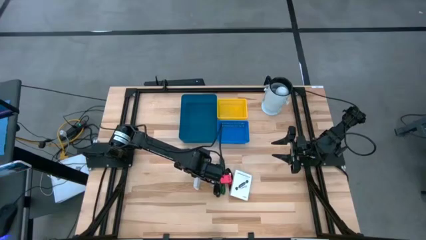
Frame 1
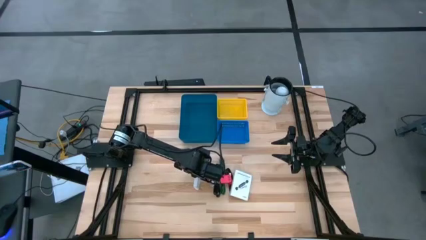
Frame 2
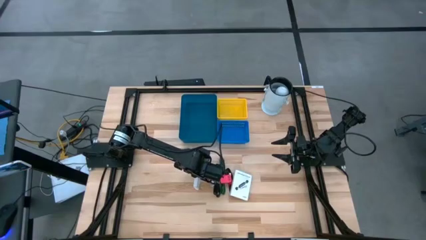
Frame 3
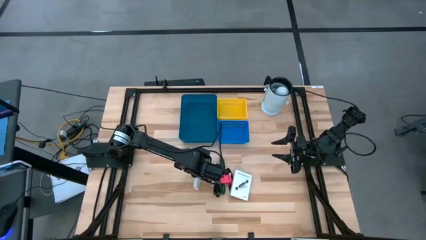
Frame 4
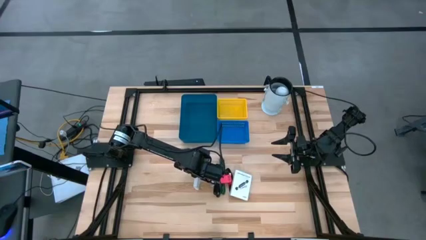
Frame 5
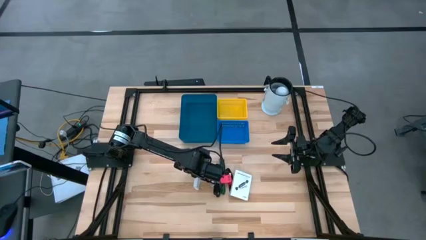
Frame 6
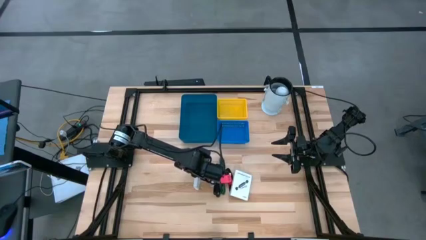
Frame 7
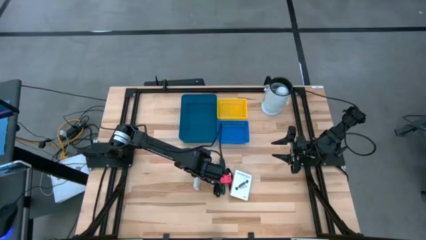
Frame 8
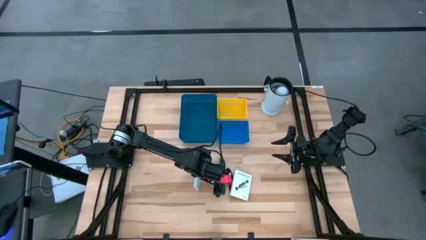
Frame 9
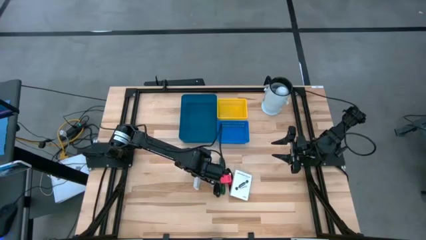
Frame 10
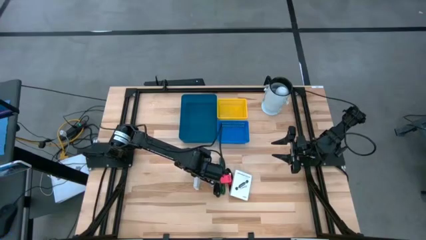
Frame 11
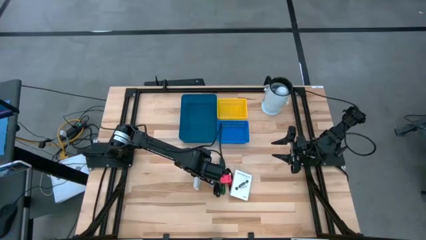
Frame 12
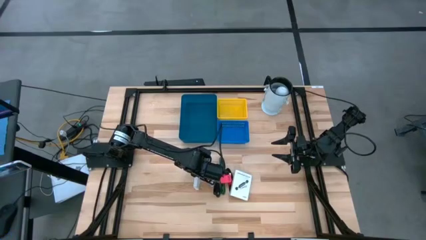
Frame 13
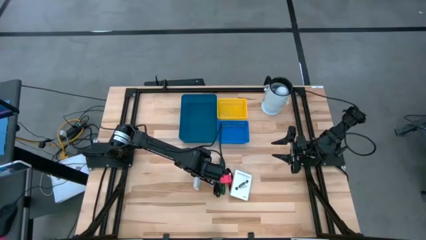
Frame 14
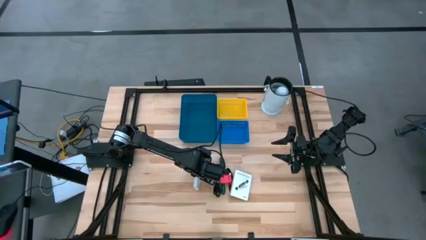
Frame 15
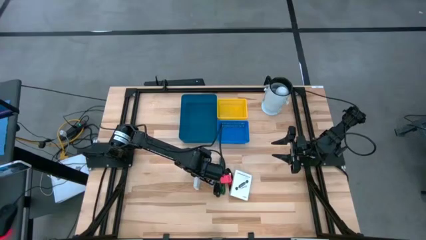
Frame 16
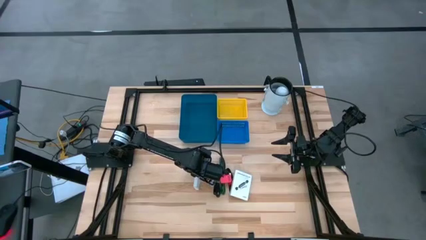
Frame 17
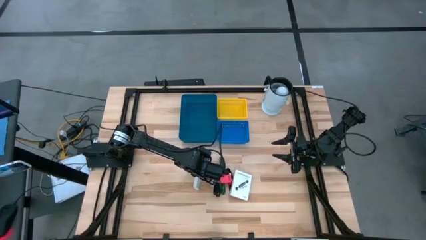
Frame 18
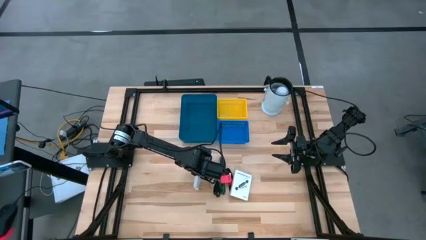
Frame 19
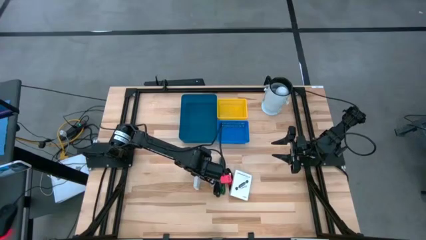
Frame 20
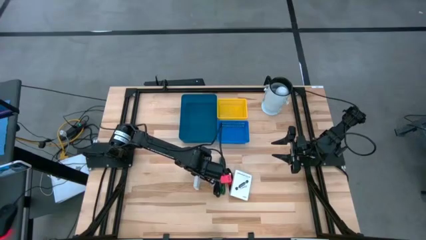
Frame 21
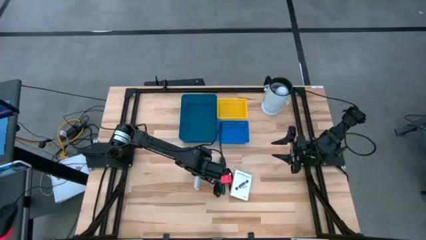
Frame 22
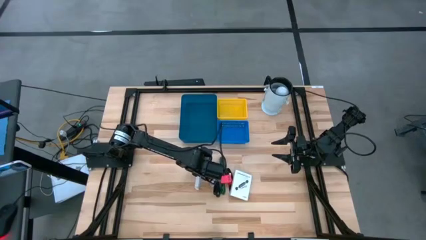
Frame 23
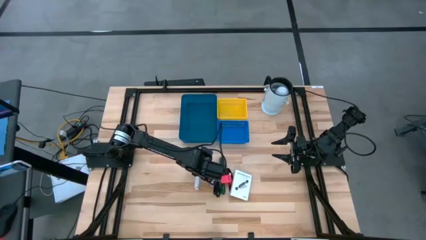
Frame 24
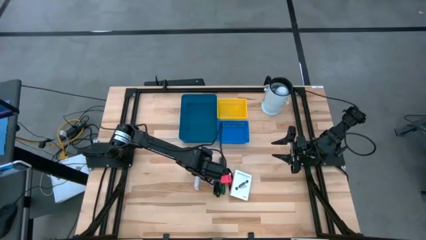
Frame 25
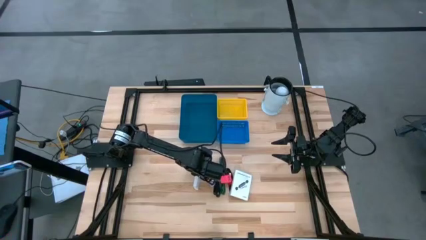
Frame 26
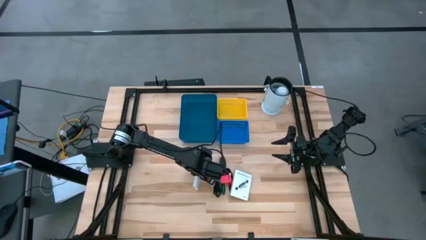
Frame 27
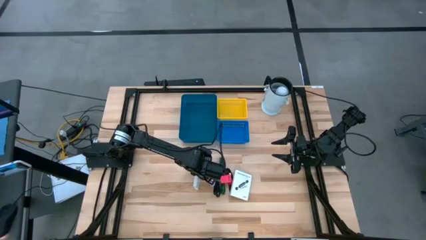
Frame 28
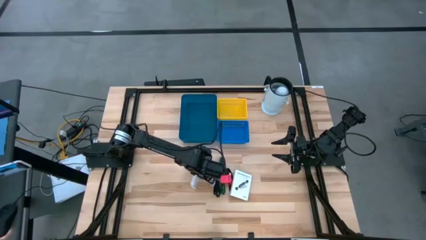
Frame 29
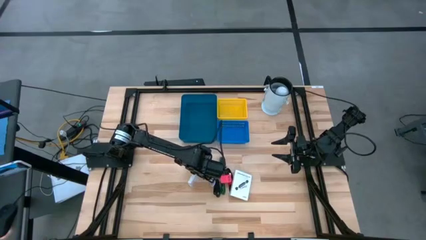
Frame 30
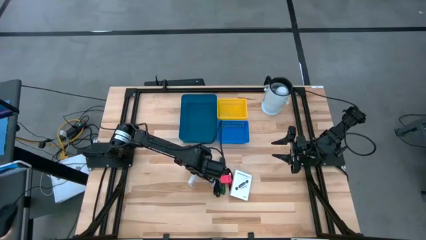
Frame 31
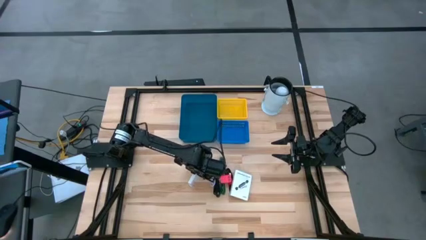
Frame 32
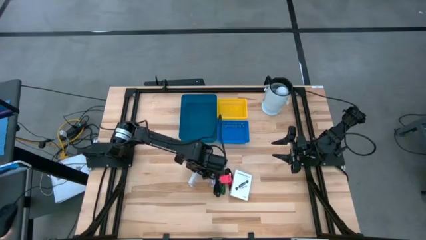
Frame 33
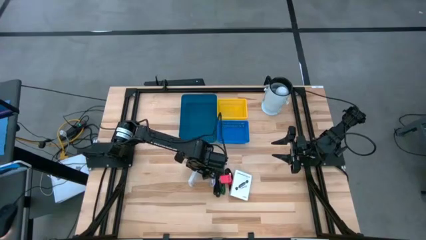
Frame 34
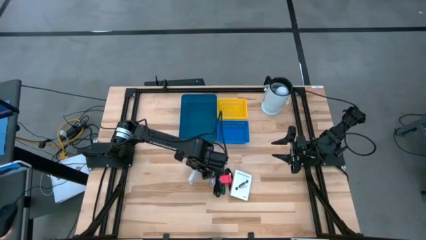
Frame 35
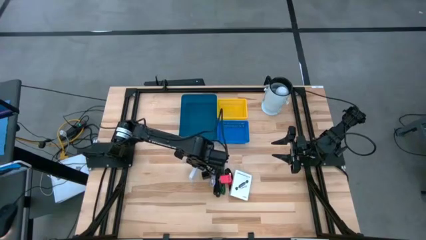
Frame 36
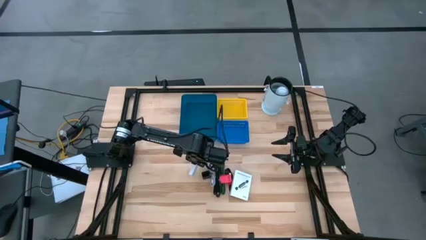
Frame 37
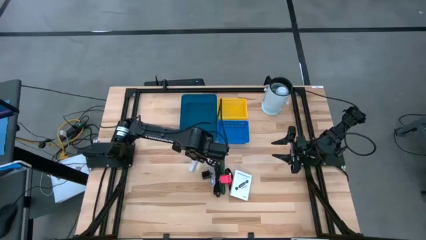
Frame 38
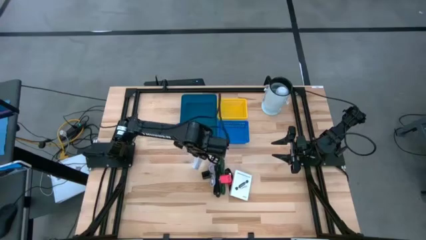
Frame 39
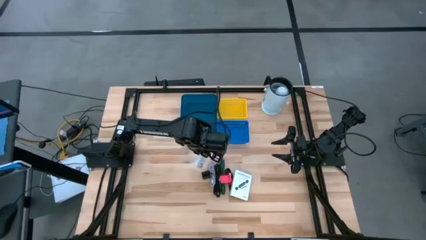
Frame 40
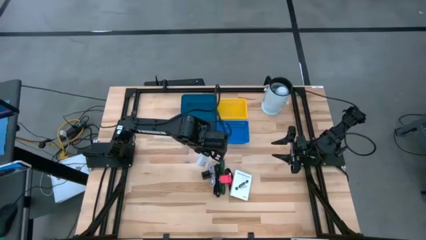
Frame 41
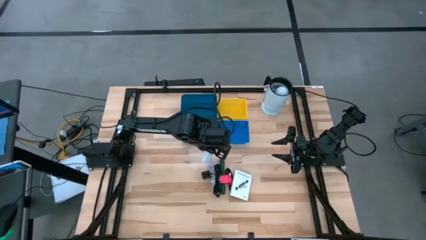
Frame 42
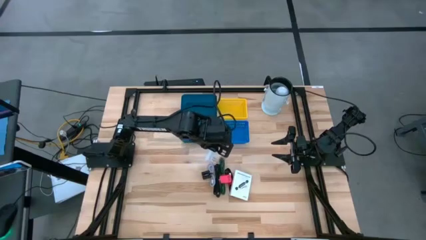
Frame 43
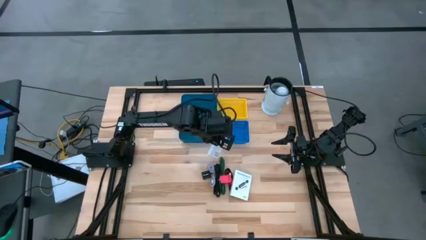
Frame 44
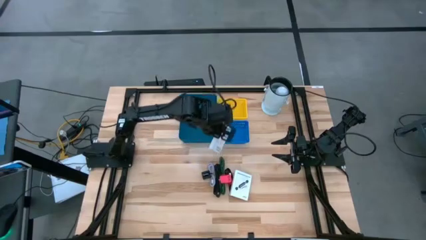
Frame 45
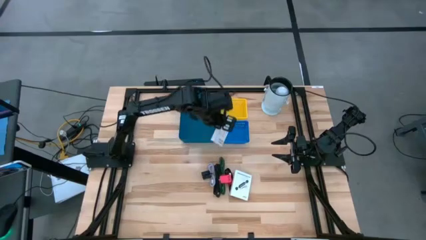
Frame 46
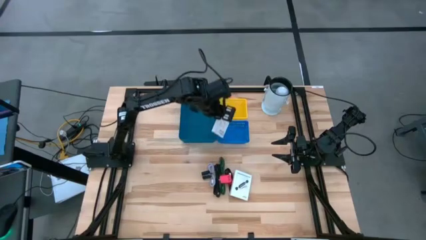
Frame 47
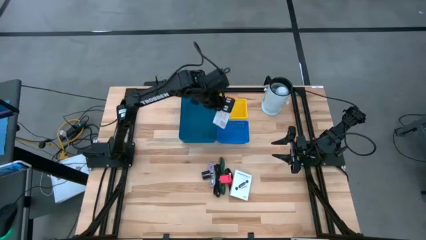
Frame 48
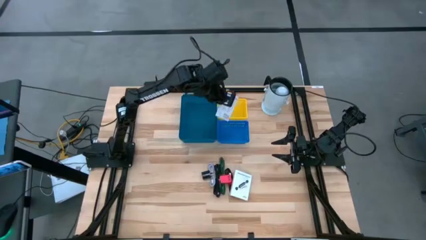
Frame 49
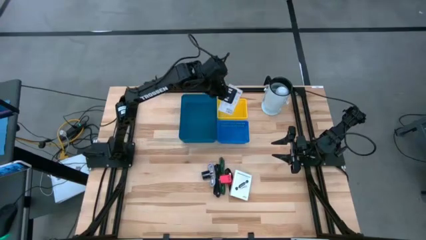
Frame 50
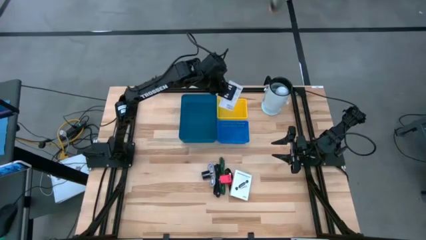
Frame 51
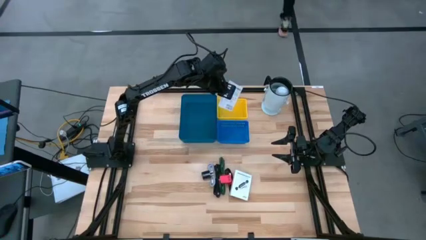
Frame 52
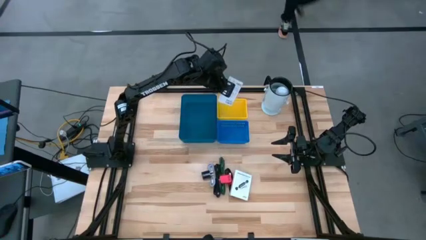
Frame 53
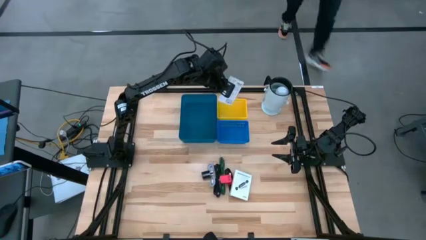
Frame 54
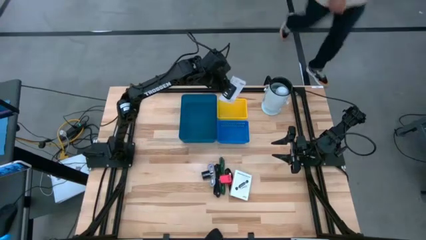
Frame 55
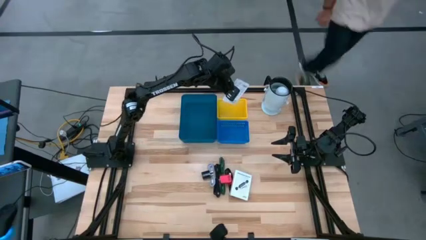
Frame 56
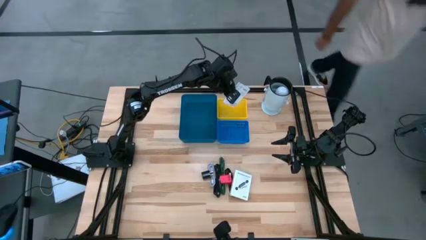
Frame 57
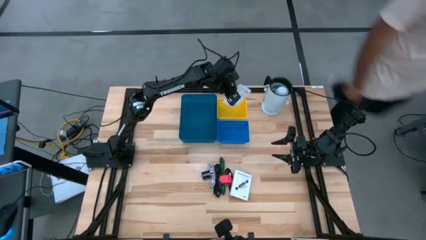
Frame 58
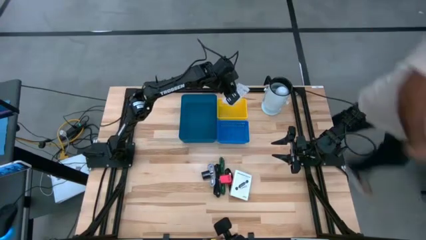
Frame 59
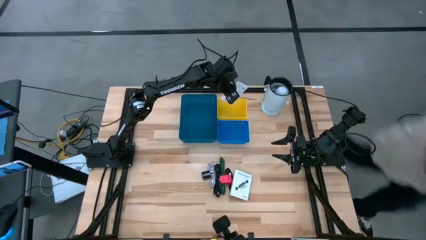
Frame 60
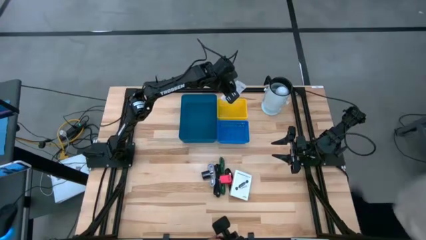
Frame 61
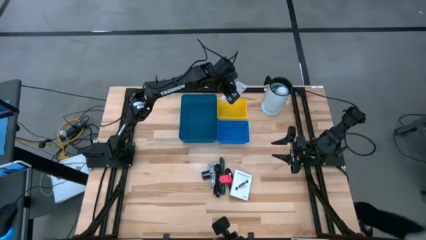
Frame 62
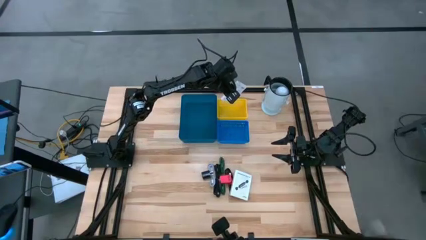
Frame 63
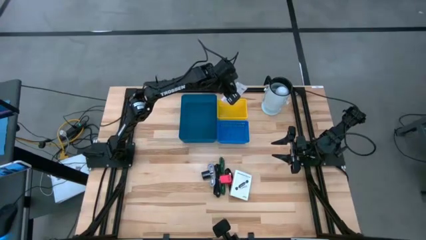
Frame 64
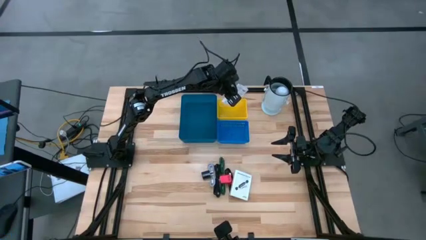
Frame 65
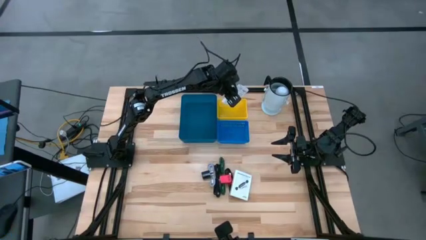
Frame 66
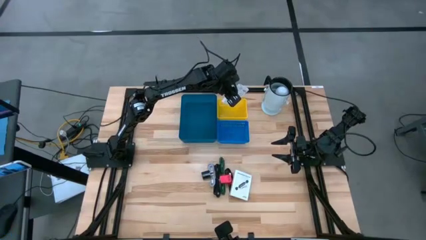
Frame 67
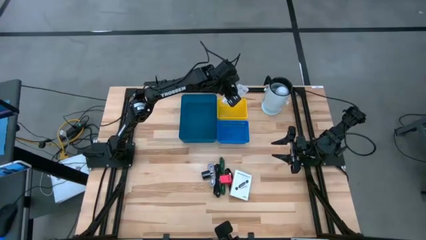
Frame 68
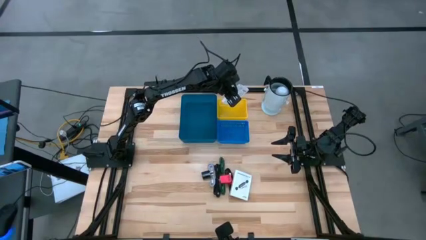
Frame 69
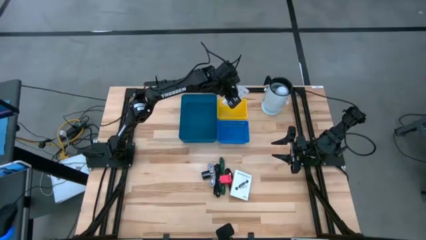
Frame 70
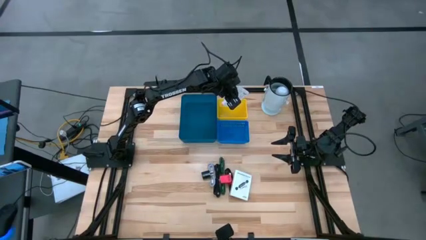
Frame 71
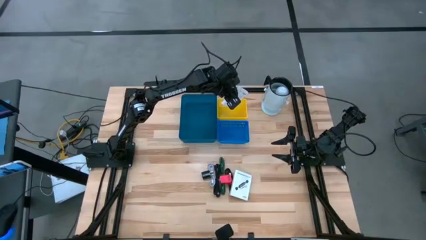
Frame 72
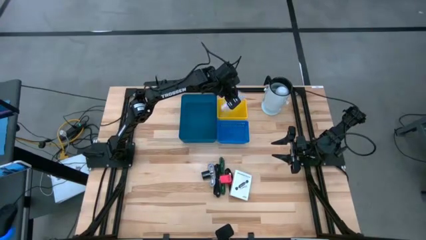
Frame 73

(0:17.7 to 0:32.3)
Task: Pick and place items into bin
Put the left card reader box into the yellow bin
